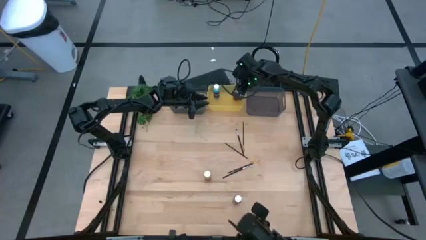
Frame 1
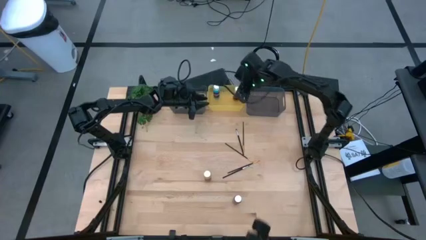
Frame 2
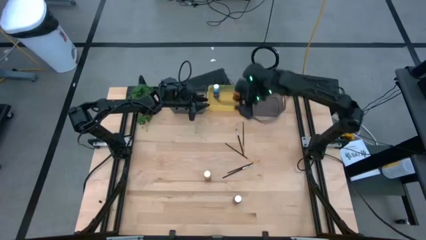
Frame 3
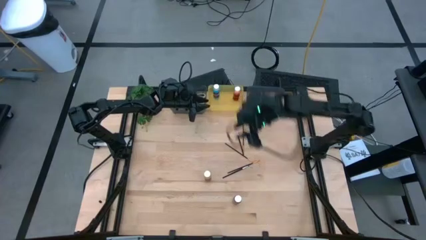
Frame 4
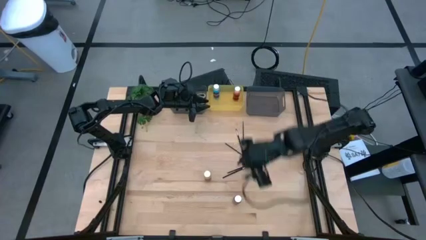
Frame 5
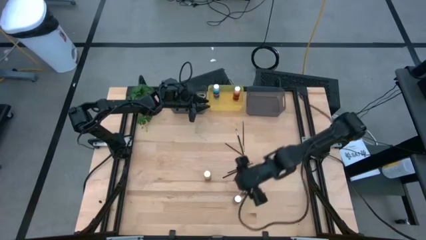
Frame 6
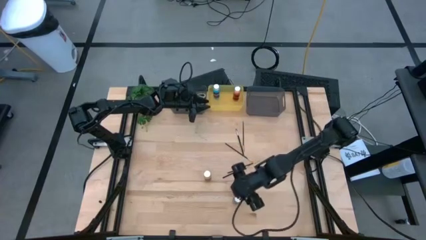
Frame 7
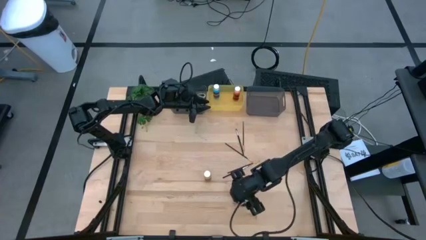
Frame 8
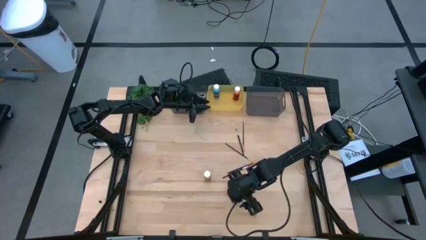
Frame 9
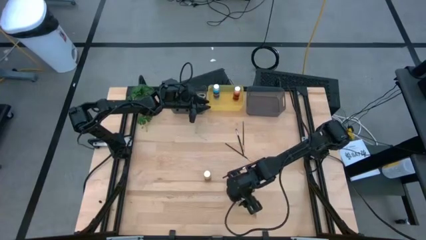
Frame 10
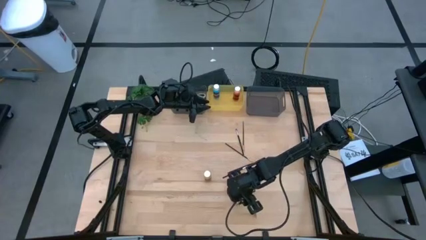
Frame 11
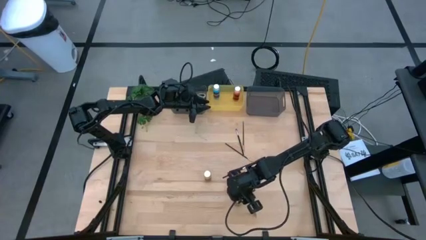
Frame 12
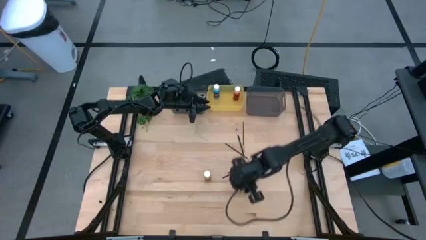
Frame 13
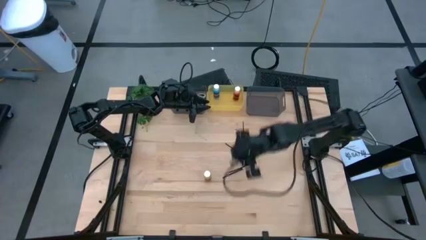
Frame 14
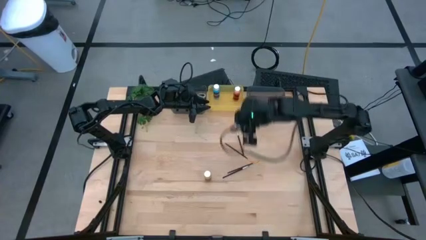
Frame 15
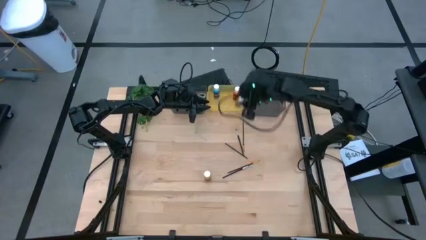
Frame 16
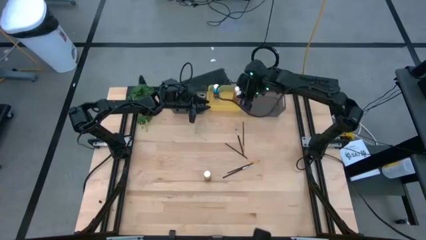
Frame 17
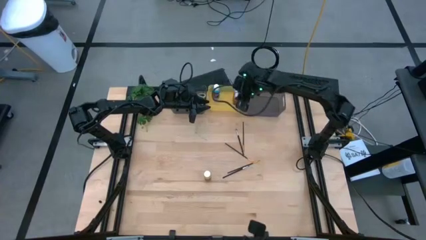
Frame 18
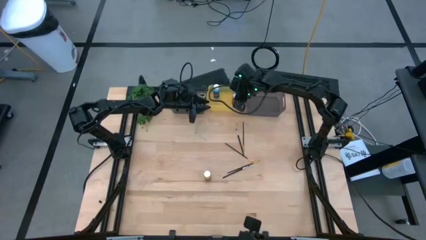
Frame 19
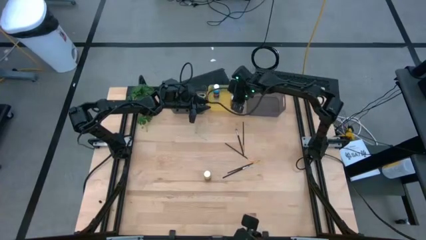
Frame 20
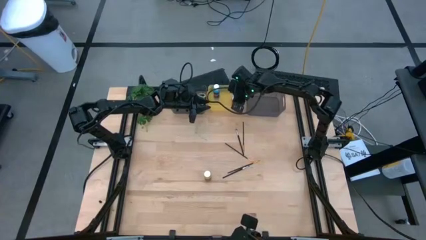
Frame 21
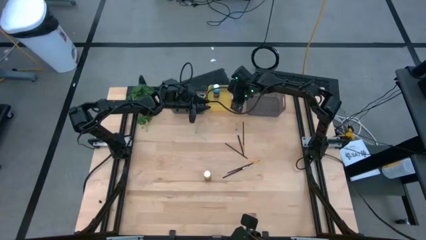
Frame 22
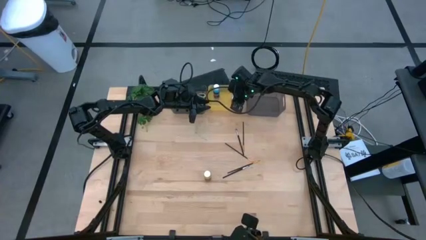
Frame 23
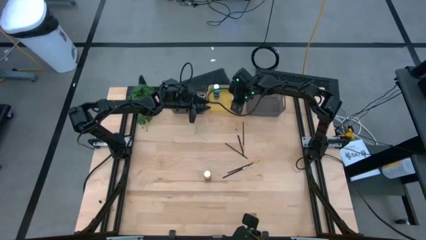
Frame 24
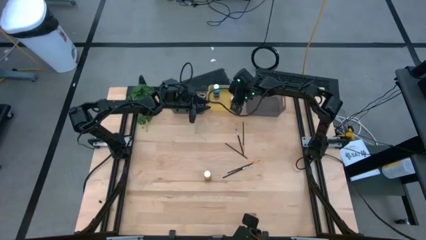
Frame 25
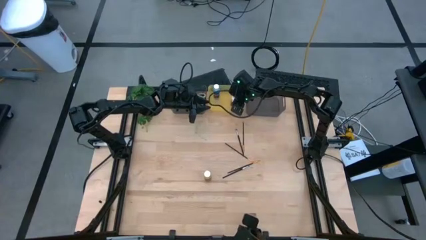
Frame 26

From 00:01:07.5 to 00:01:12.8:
Task: Pick & Place Paint Supplies
Put the red paint bottle into the yellow bin

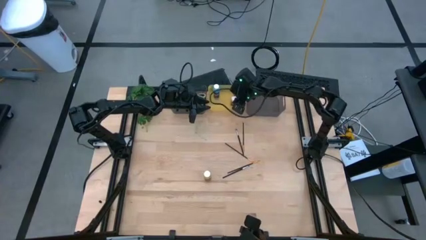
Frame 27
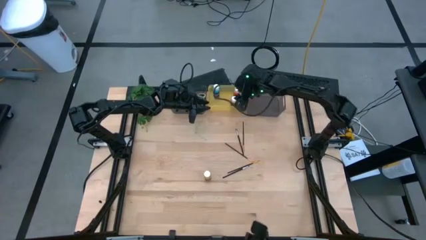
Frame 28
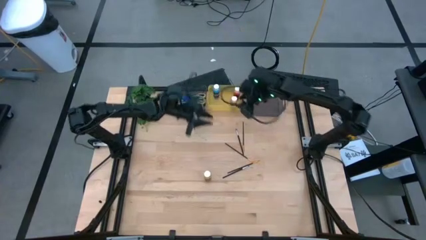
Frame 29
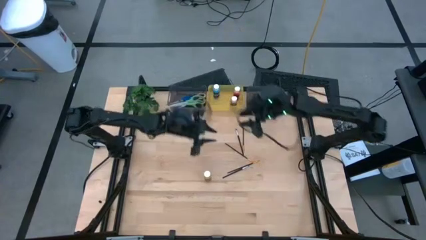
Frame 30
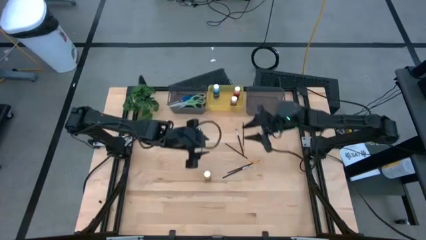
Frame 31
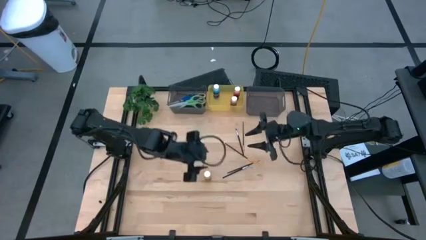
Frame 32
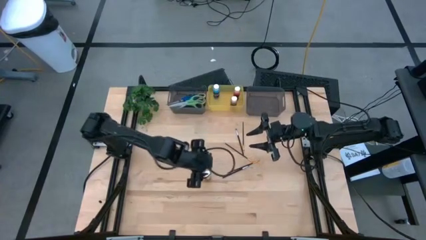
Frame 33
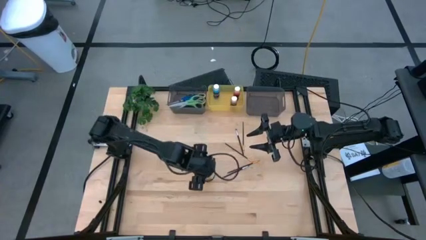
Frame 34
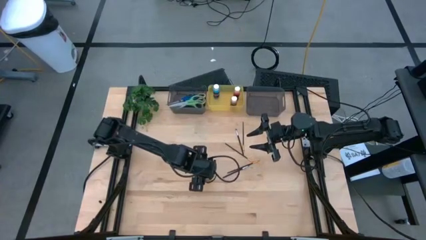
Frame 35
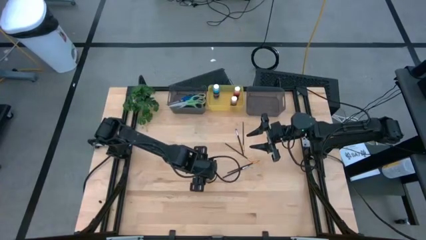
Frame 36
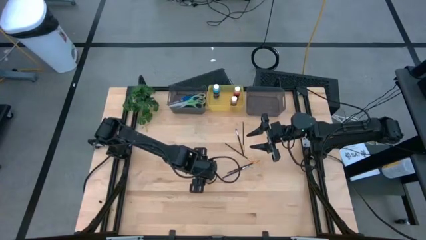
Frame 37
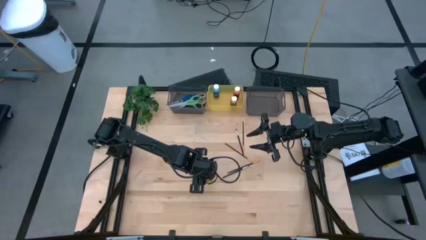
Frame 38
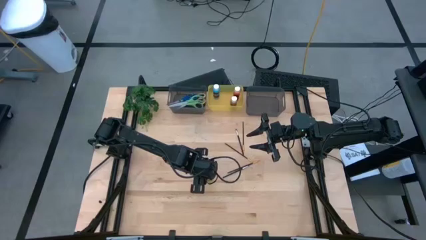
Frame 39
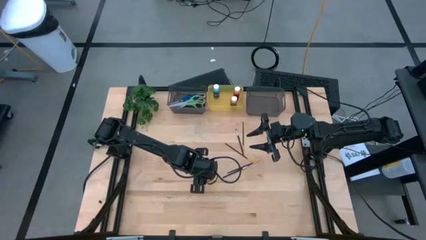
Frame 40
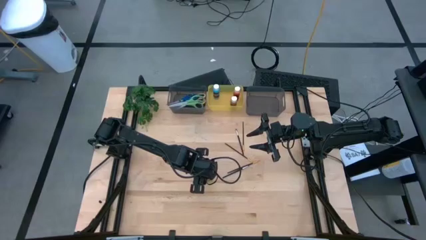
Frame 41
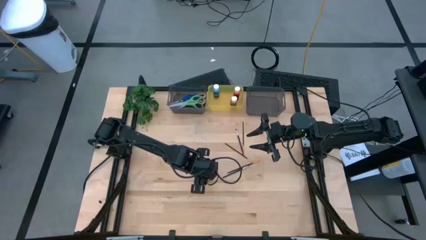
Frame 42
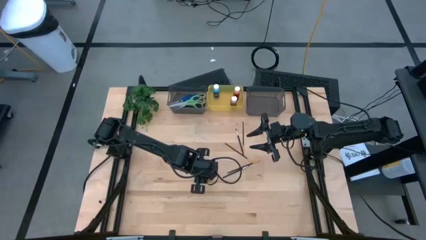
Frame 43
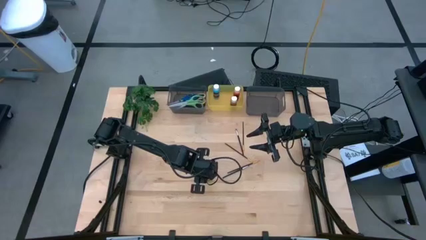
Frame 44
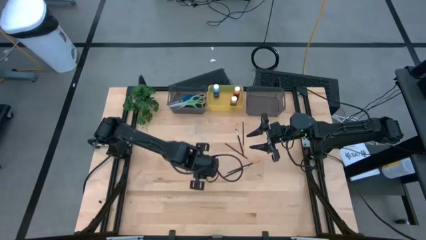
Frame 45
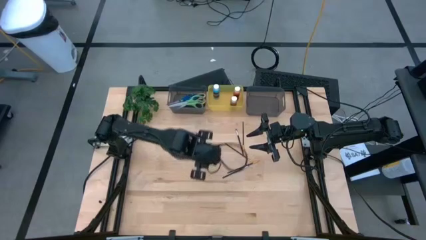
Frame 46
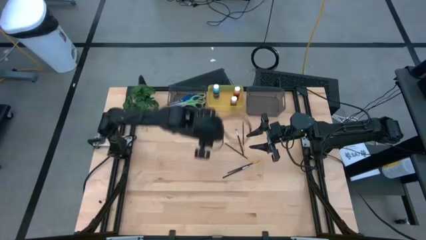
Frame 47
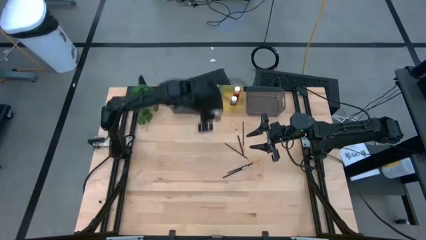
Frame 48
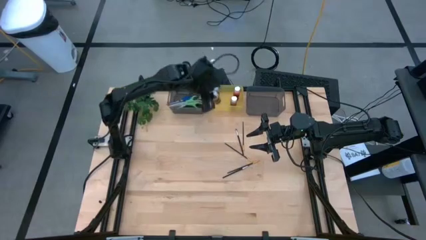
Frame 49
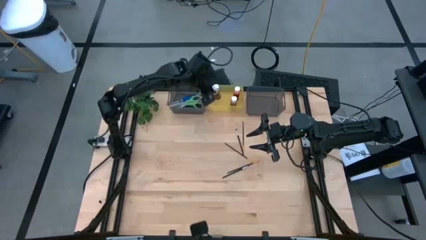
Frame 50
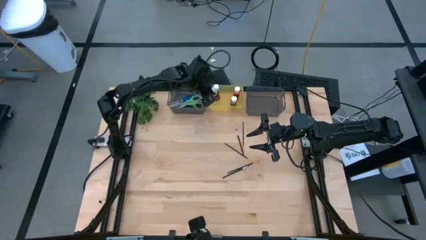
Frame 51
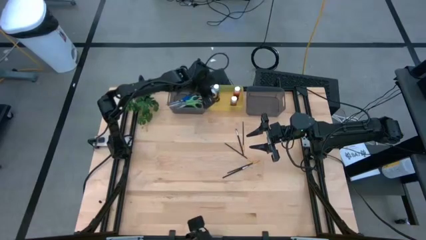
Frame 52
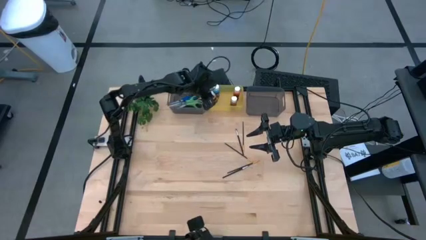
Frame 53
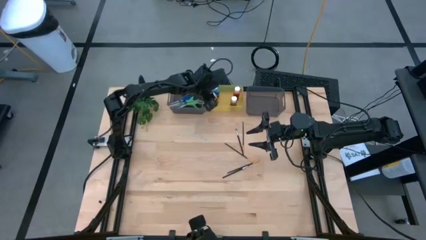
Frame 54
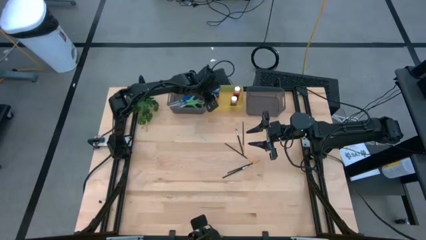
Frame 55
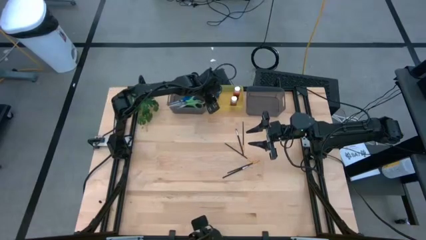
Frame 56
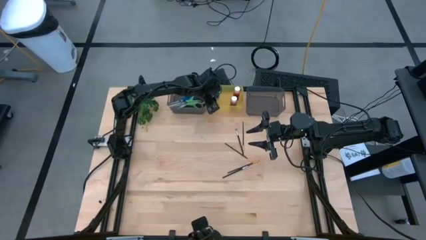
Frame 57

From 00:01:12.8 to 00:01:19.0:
Put the yellow paint bottle into the yellow bin

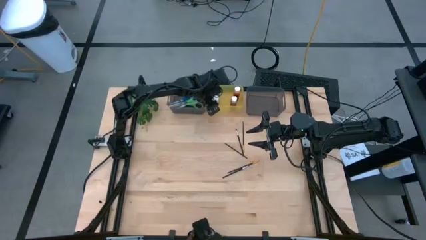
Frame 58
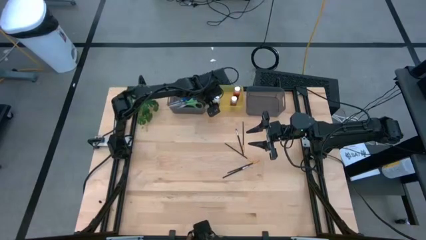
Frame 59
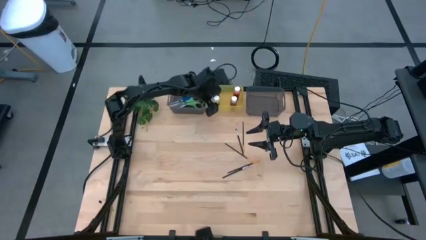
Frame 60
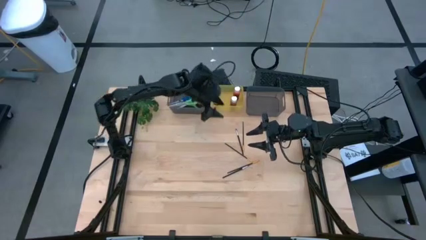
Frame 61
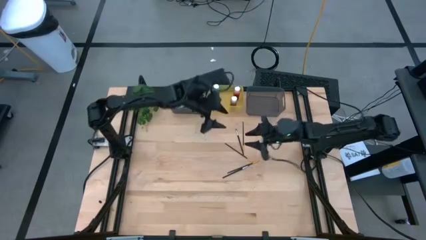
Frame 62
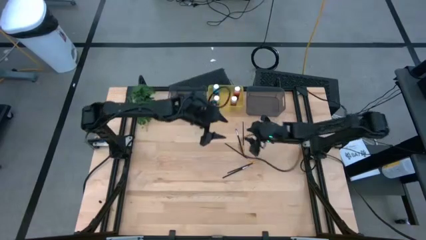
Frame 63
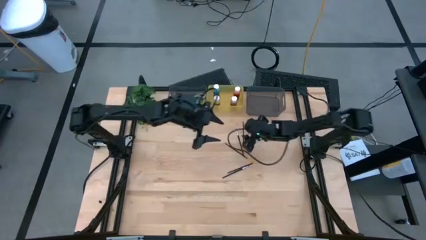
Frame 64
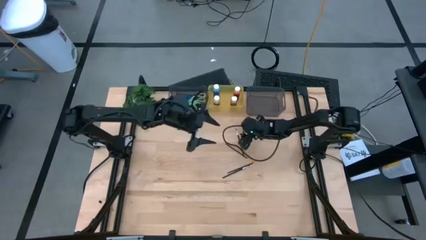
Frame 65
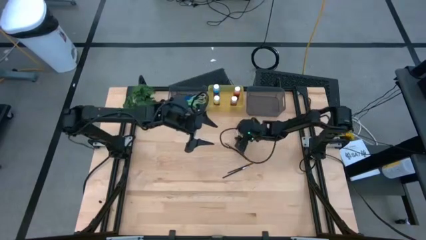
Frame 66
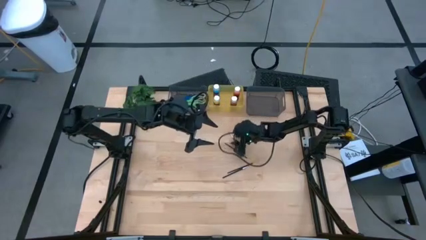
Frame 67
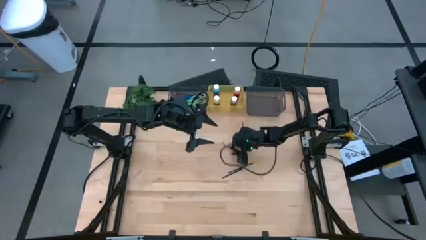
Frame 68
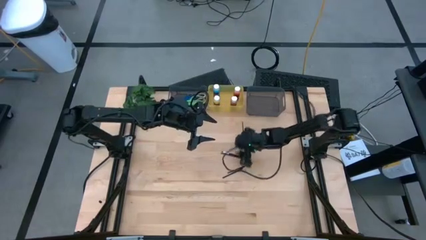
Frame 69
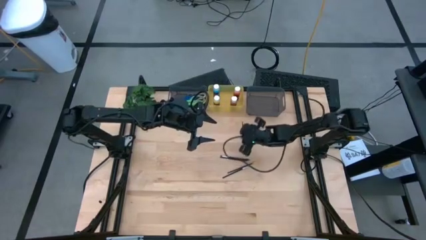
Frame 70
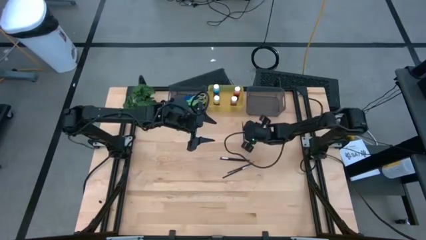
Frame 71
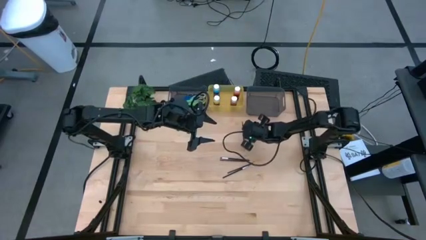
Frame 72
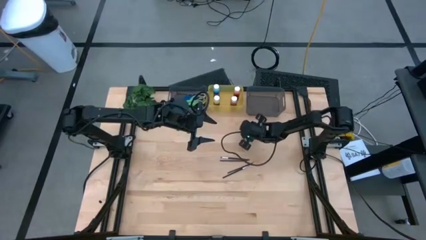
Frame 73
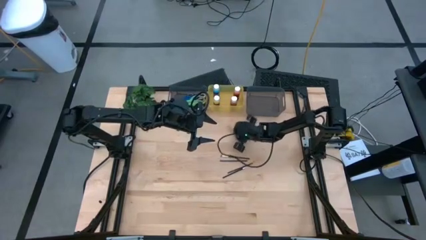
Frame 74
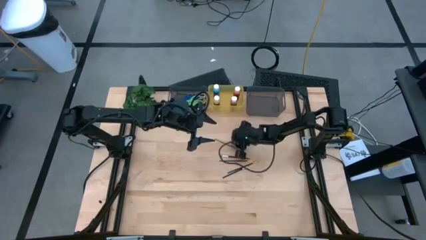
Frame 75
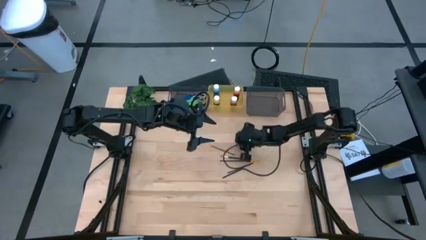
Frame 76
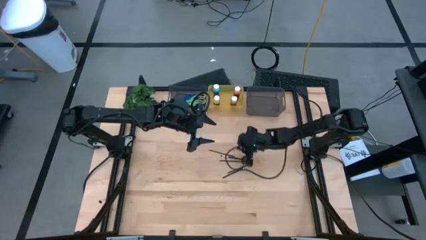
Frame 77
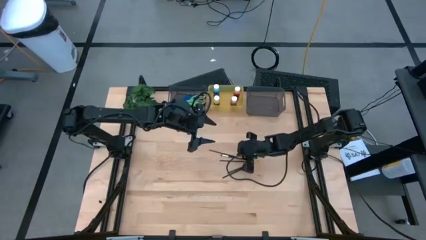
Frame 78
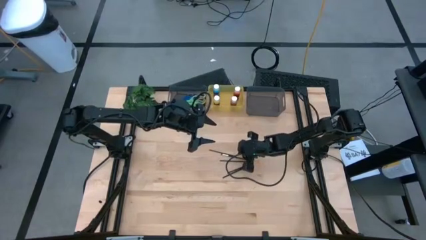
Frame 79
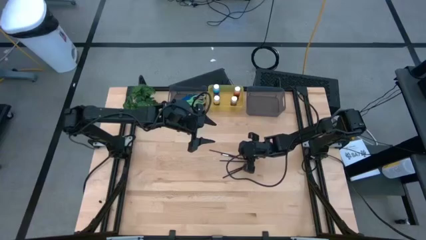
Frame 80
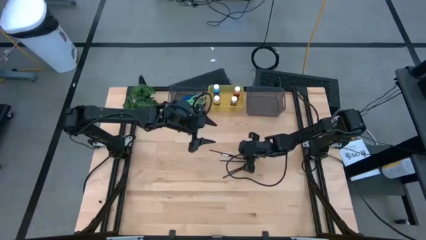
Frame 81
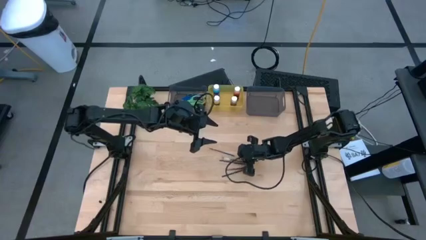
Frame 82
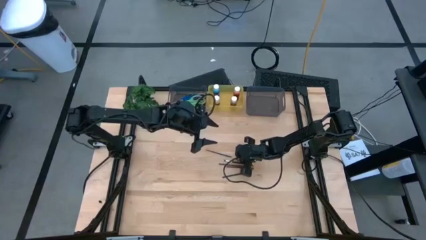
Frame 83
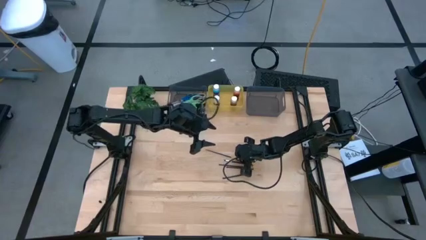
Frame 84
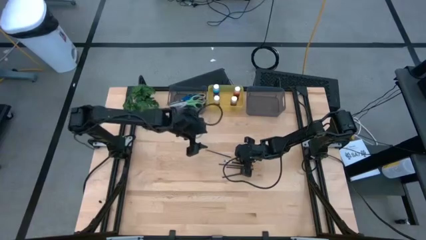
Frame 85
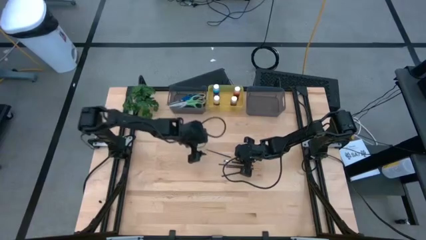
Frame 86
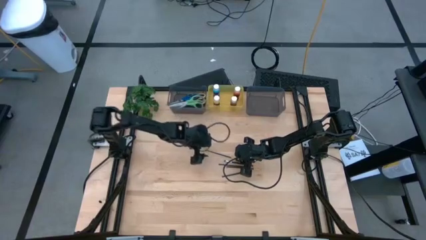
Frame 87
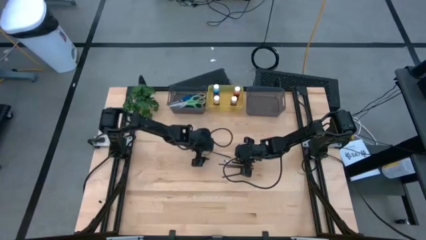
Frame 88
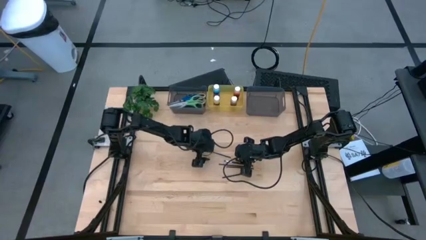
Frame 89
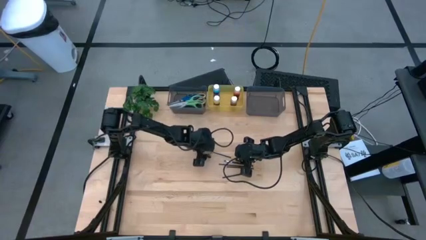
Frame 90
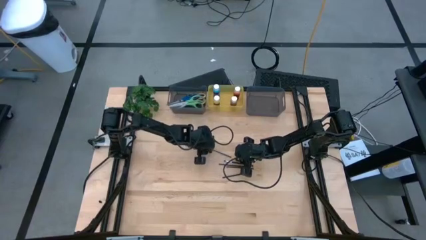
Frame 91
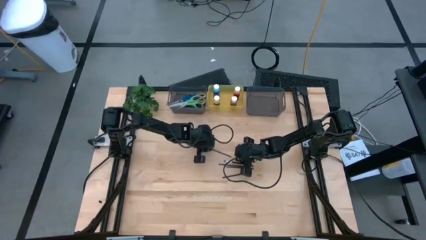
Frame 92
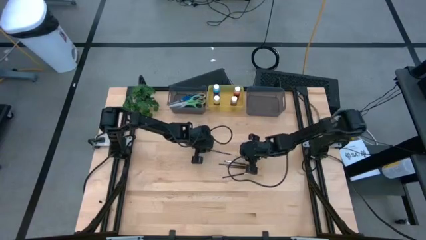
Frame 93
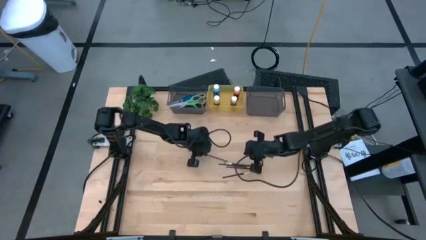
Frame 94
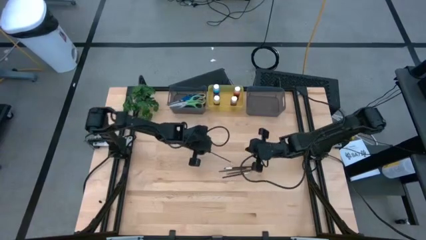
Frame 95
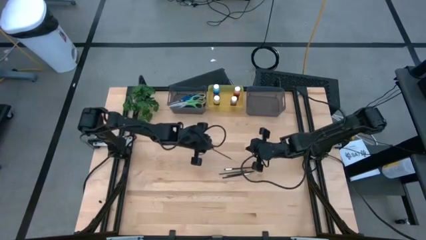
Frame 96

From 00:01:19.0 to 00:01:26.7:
Put the top gold paintbrush into the right black bin
